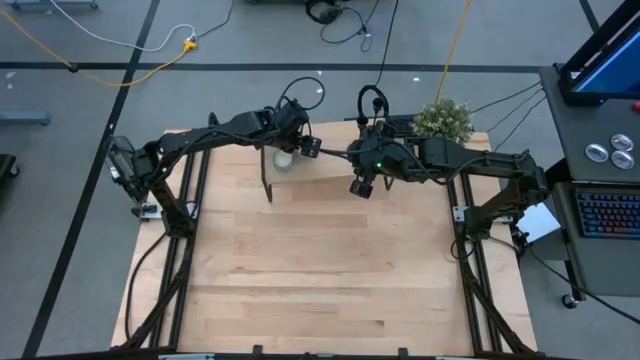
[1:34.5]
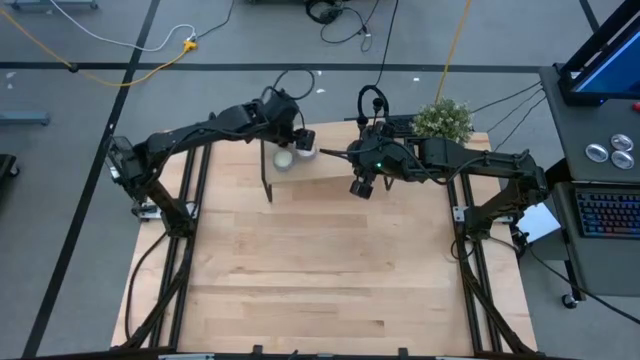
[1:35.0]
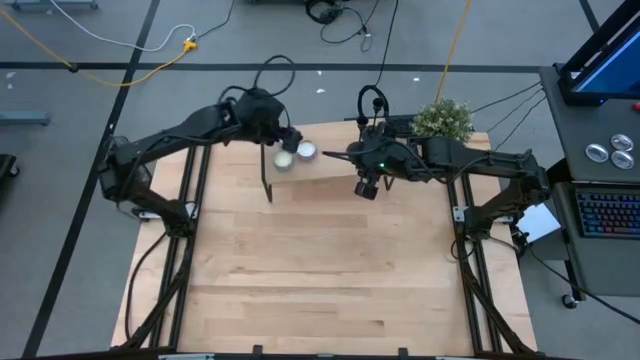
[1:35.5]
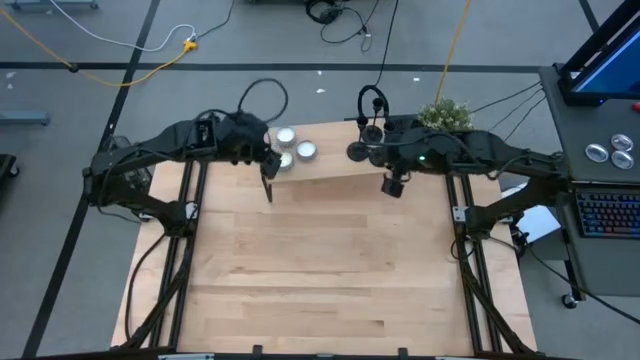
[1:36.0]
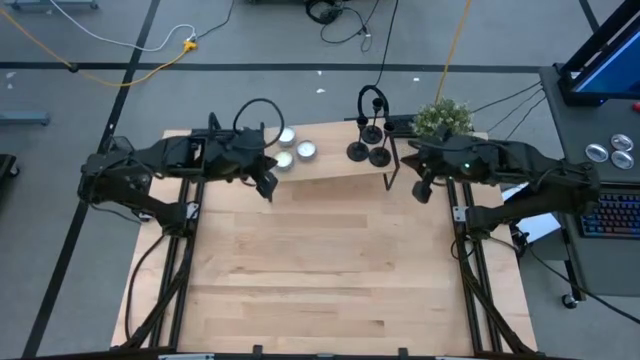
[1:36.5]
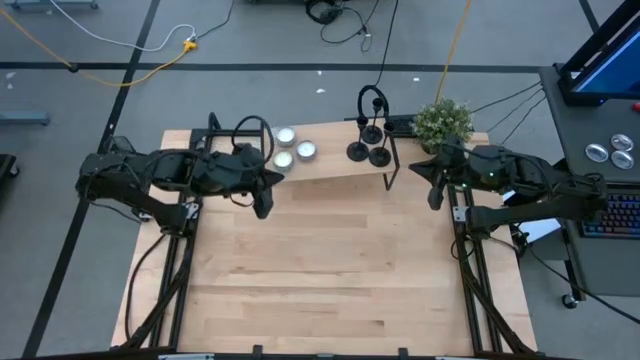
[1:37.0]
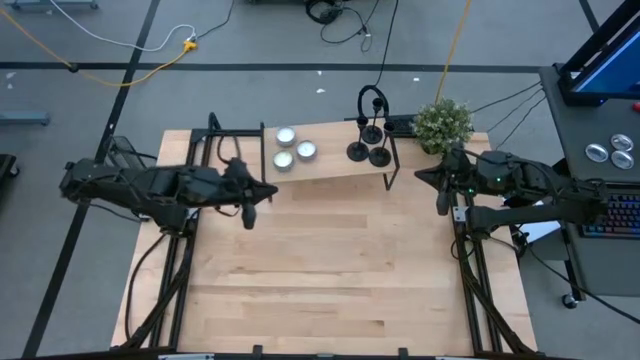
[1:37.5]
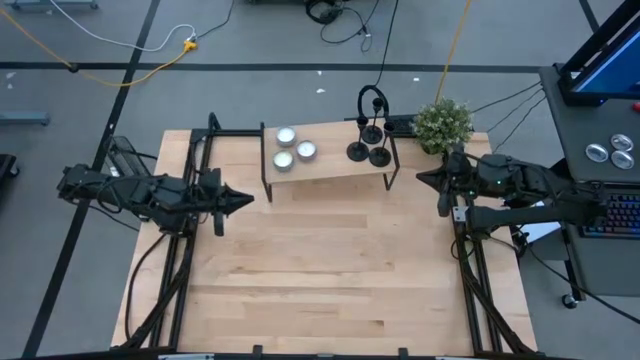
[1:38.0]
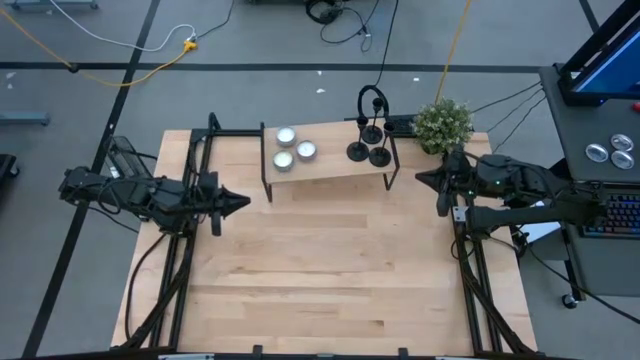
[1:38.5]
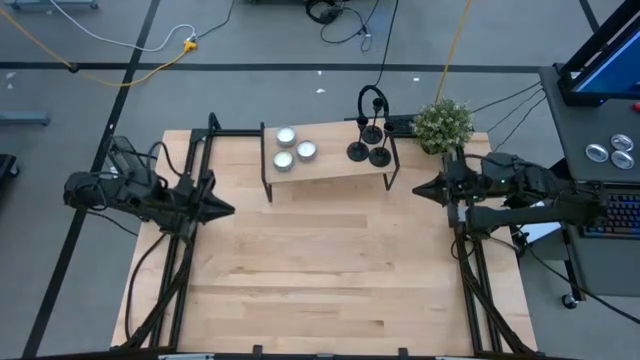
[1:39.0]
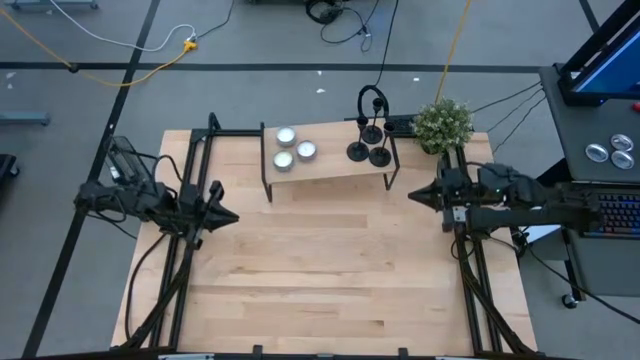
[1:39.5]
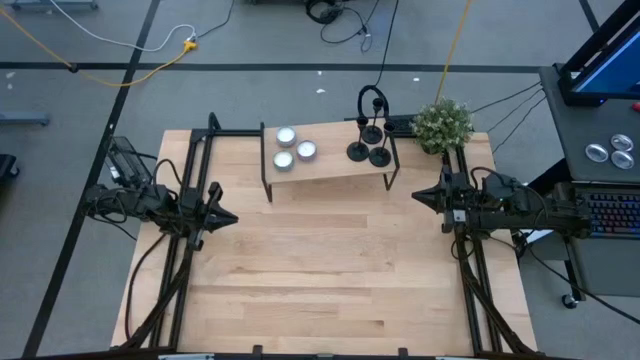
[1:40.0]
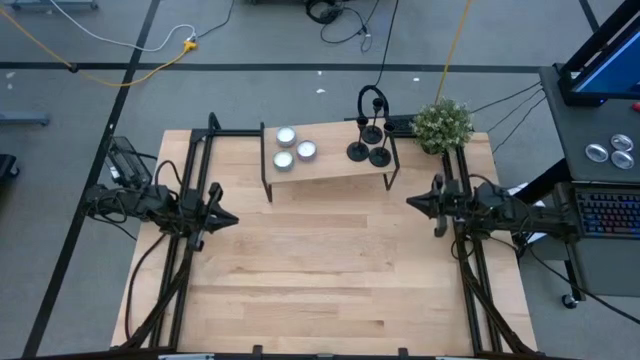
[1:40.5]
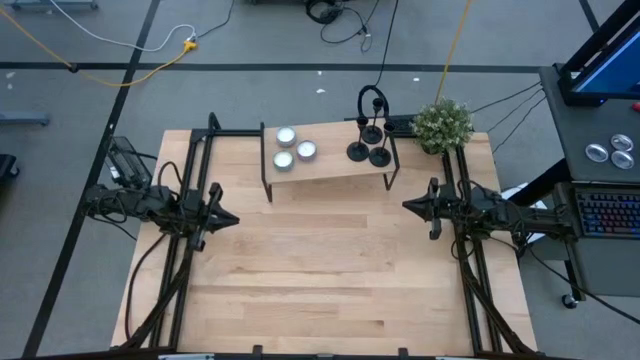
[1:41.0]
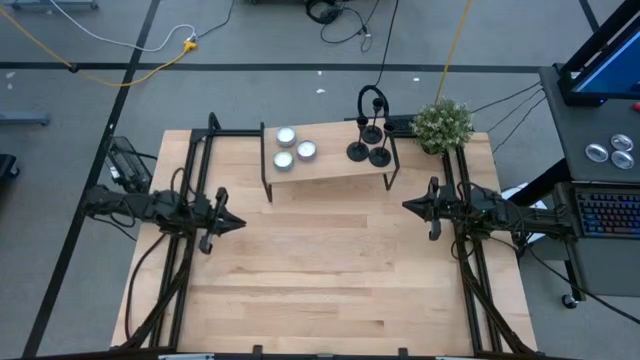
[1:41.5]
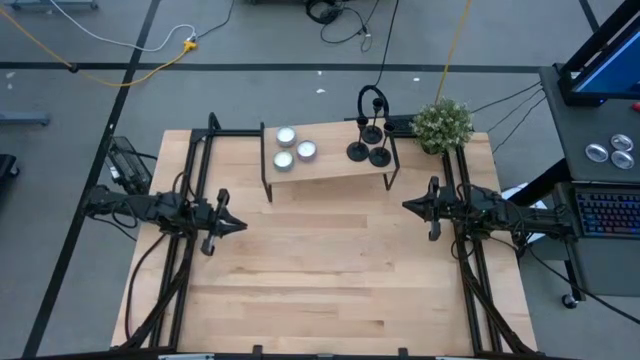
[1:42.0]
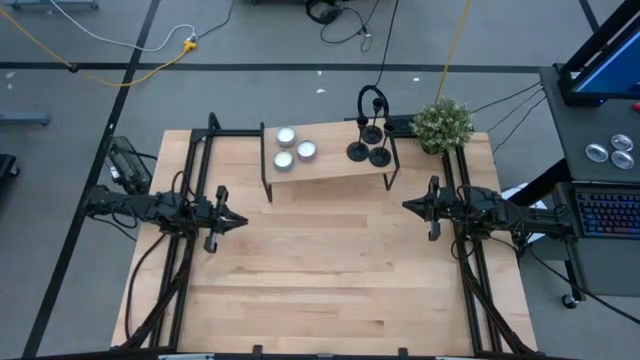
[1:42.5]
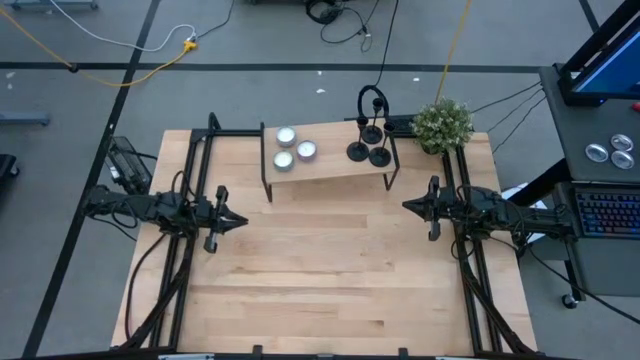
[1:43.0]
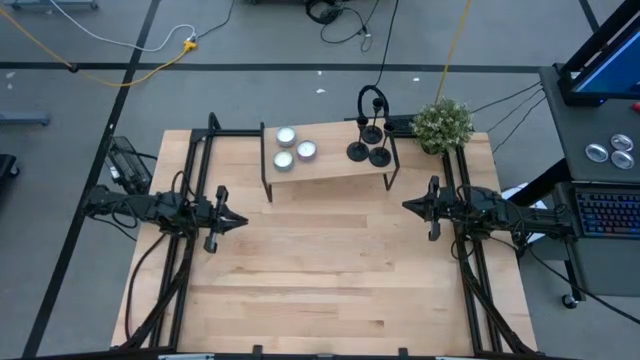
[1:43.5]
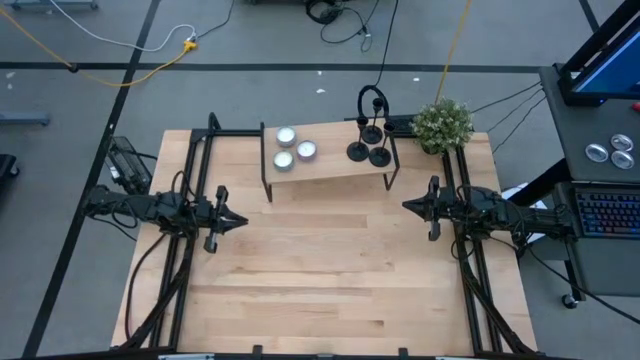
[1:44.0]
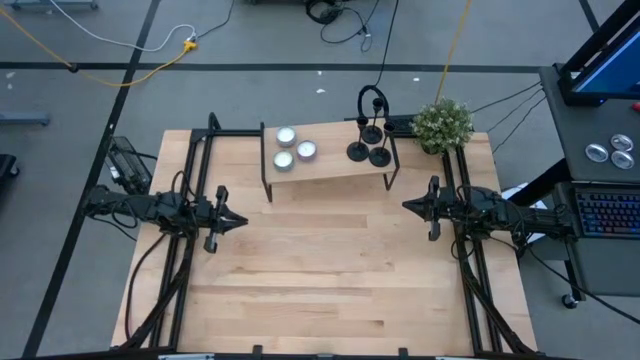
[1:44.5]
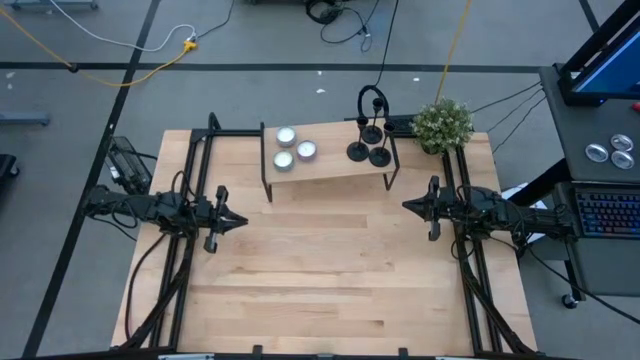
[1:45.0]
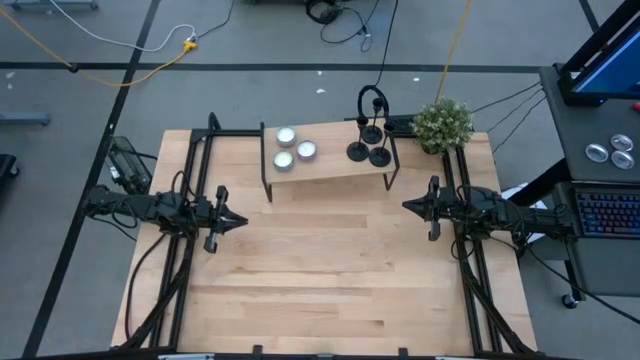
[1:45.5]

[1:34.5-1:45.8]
Task: Pick & Place candle stick holders
Return to Home Position

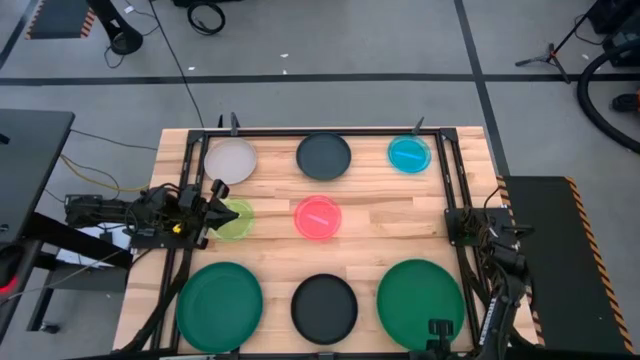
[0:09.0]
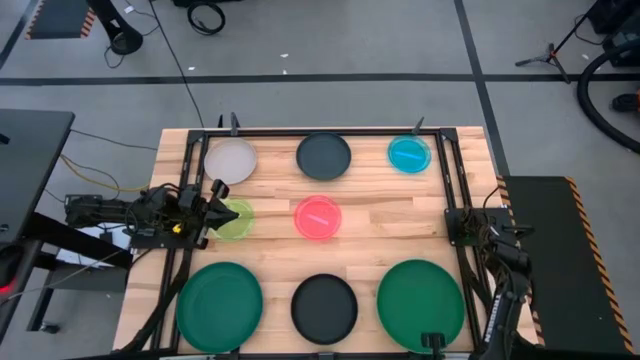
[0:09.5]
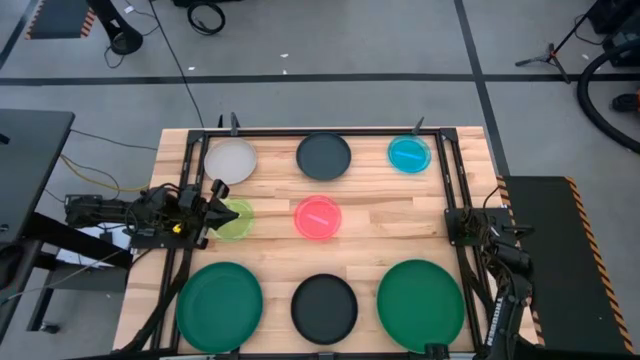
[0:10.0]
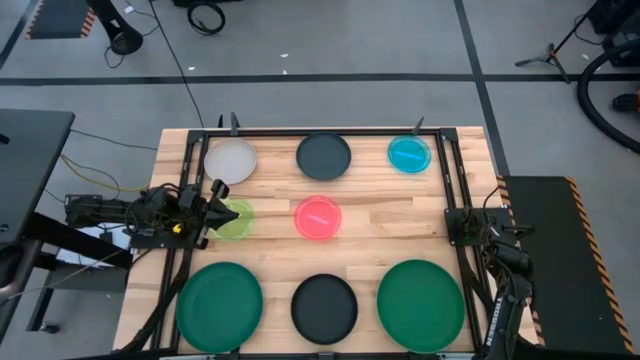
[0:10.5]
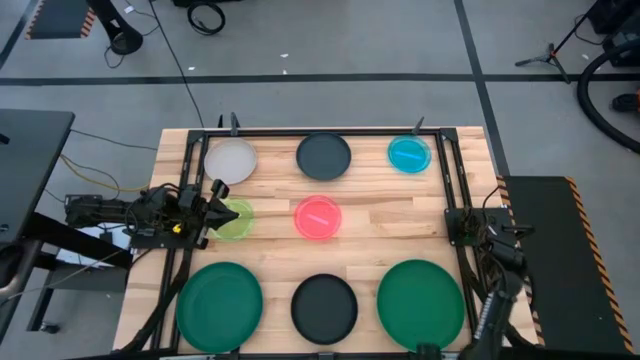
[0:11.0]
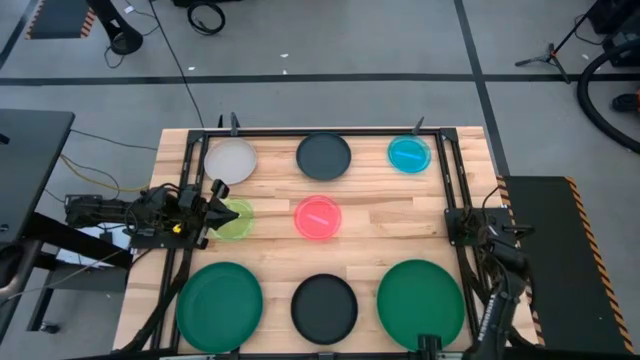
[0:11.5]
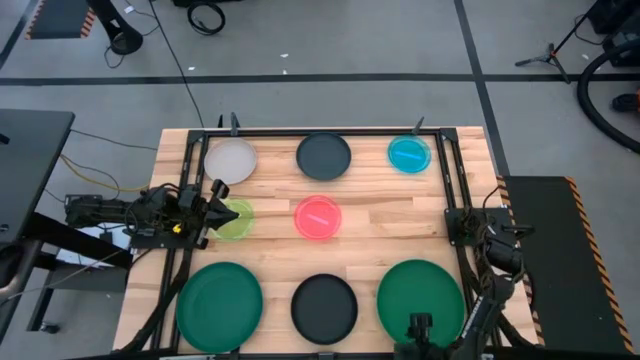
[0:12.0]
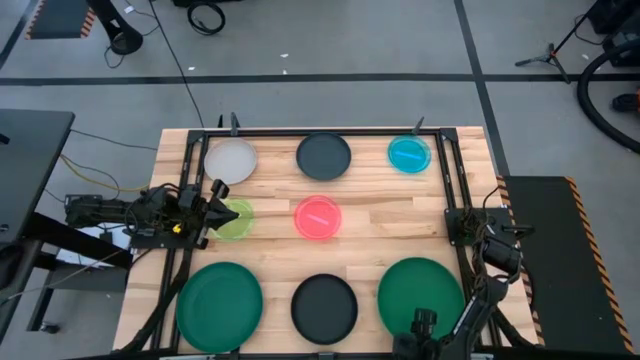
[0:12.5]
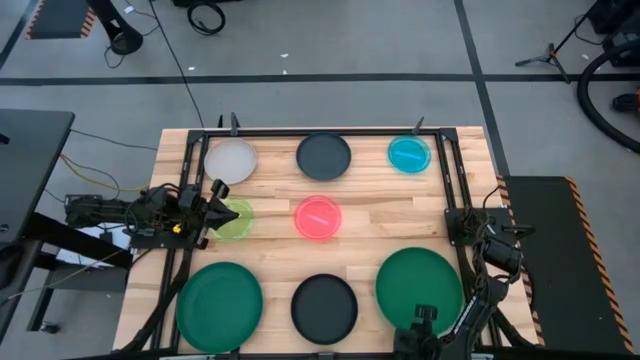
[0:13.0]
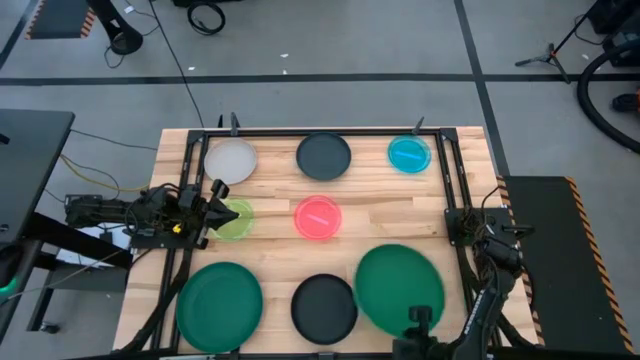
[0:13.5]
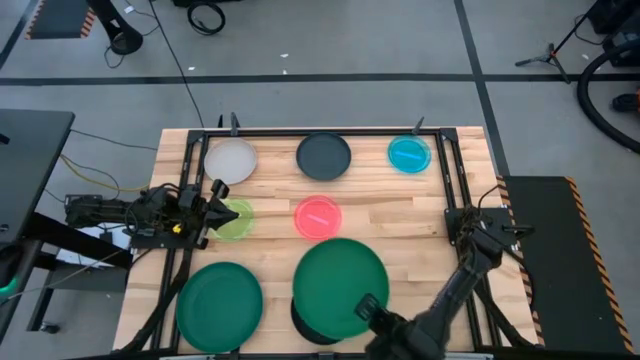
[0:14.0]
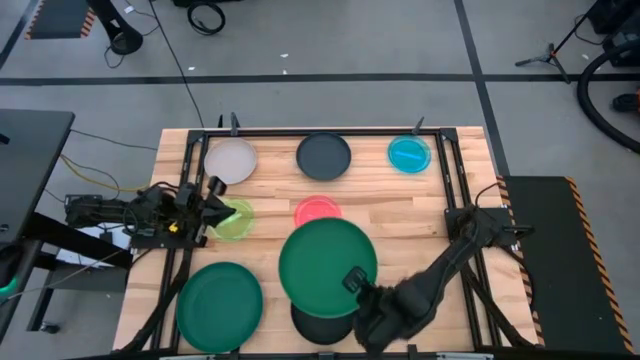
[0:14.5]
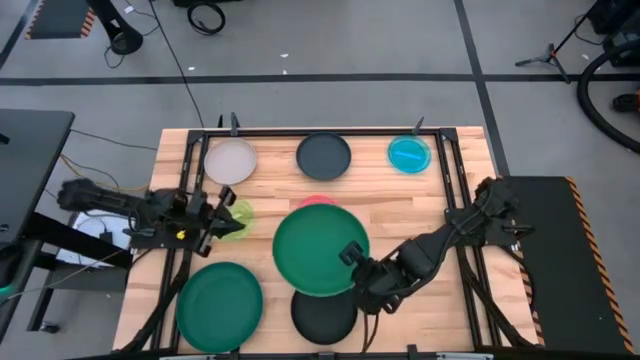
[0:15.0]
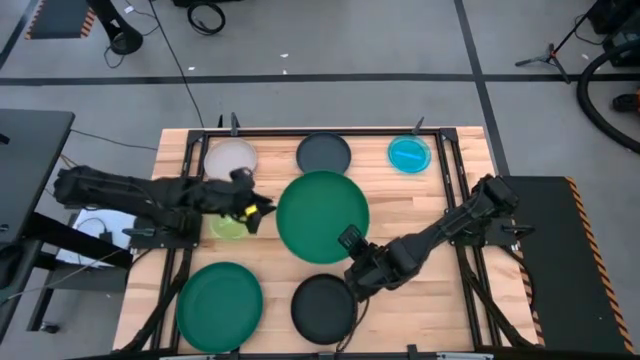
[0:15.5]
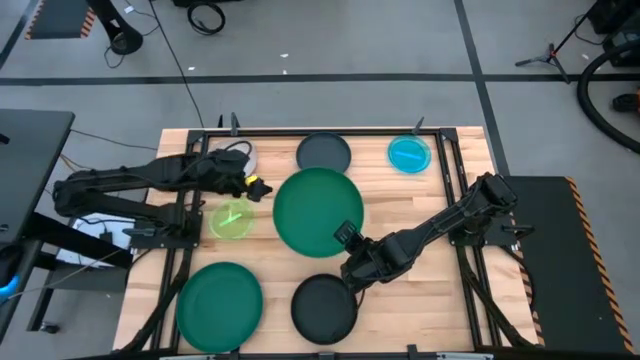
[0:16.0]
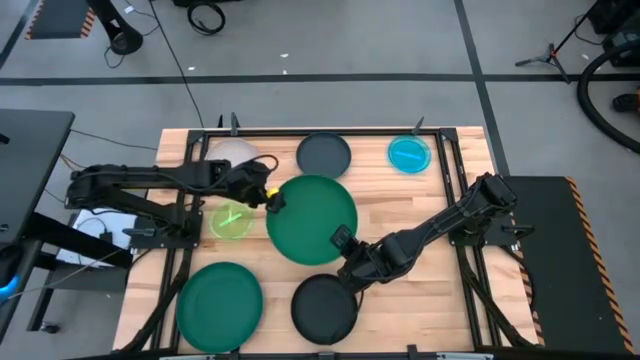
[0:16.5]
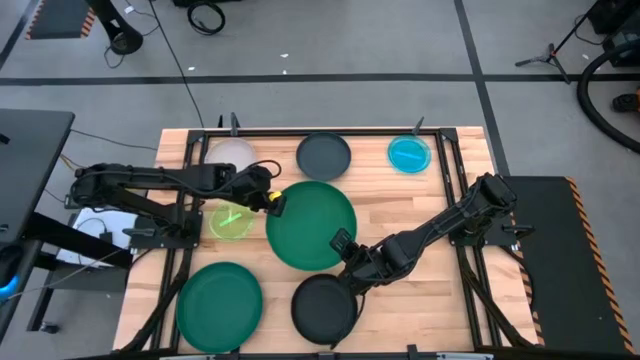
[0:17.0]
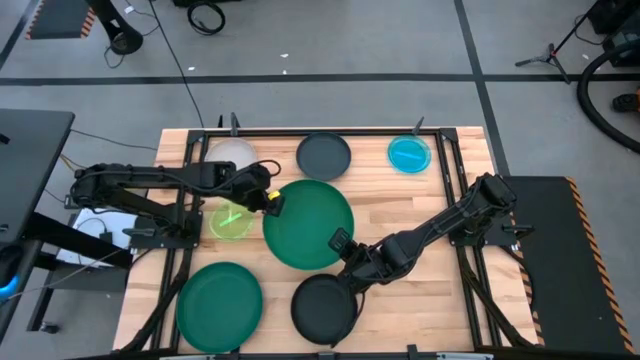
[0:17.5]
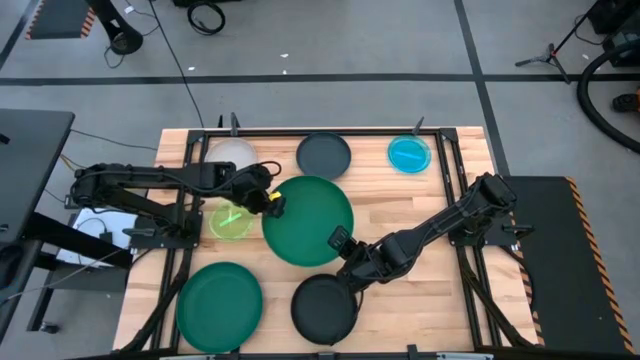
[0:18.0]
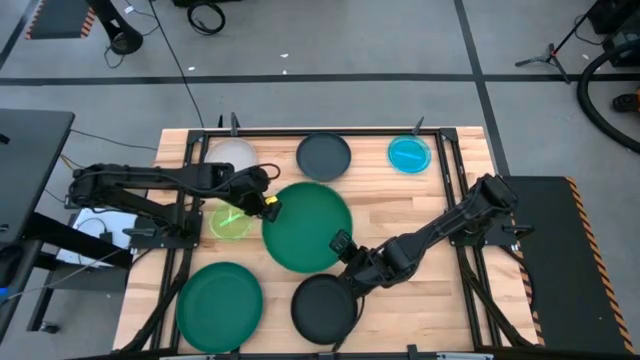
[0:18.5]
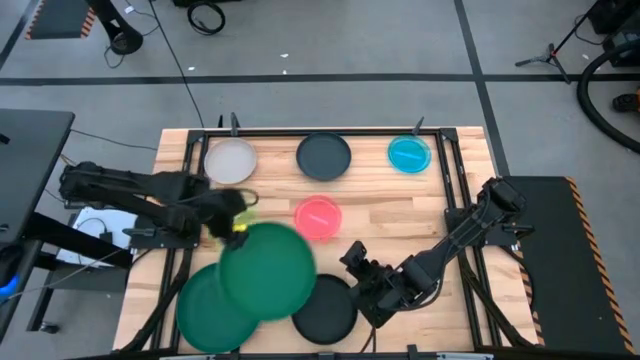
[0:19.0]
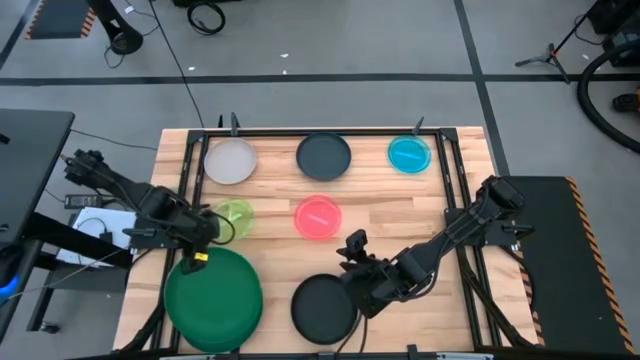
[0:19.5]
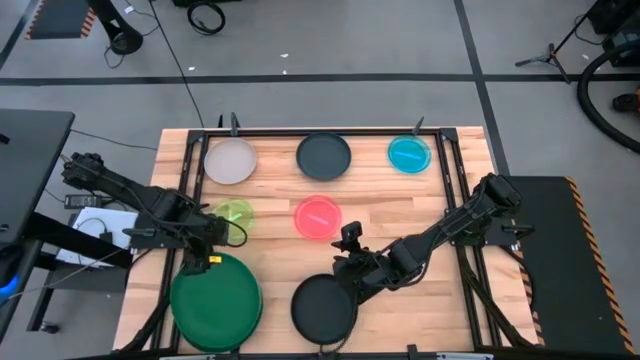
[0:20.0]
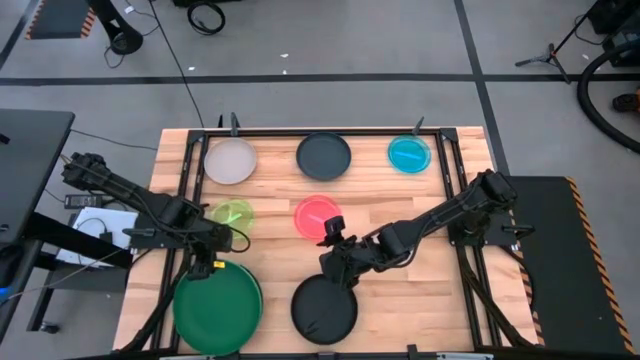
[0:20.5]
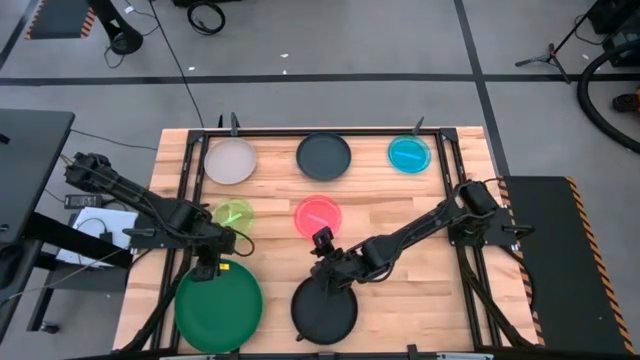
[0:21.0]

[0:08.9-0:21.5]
Task: Stack plastic plates
Stack the green stacked plates on top of the dark green plate
